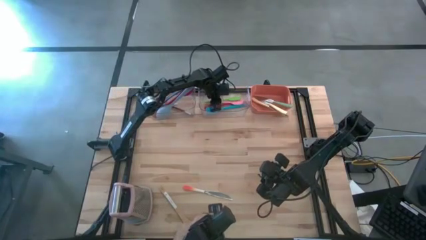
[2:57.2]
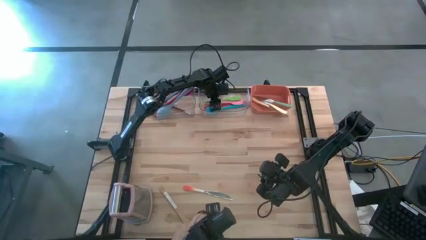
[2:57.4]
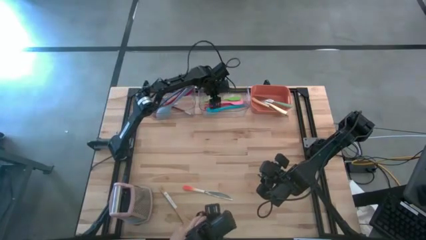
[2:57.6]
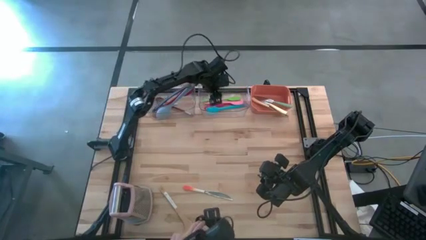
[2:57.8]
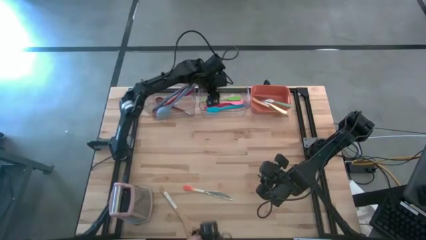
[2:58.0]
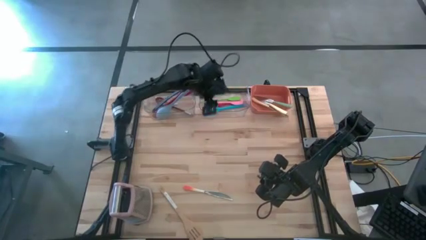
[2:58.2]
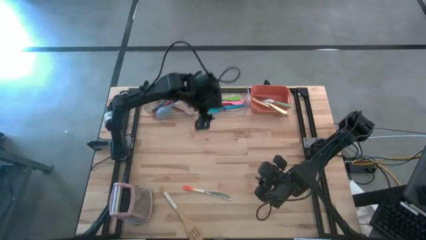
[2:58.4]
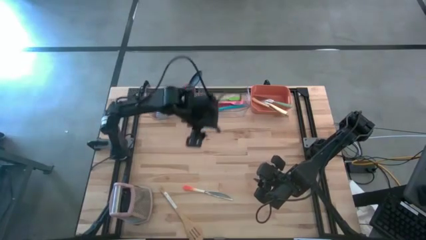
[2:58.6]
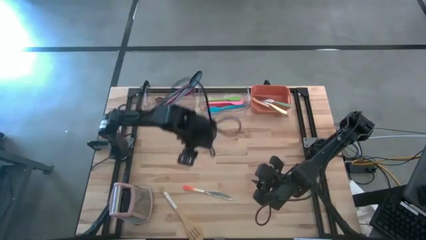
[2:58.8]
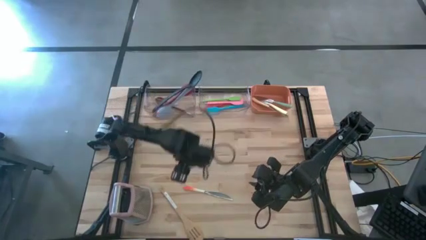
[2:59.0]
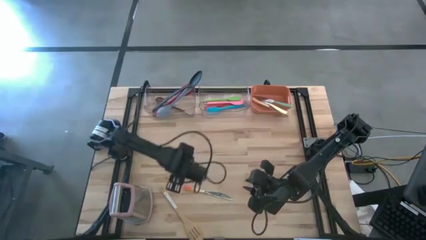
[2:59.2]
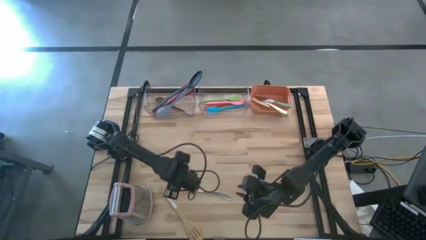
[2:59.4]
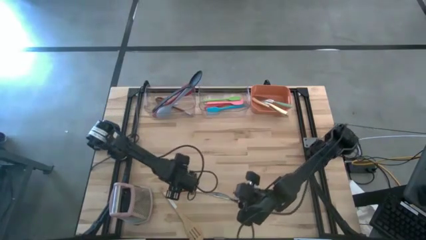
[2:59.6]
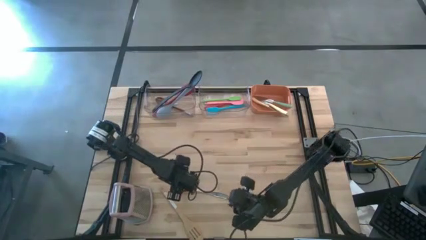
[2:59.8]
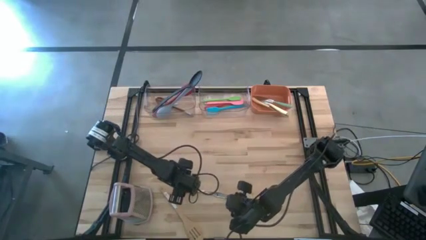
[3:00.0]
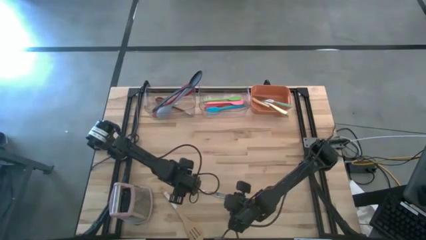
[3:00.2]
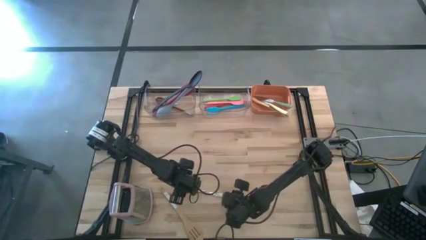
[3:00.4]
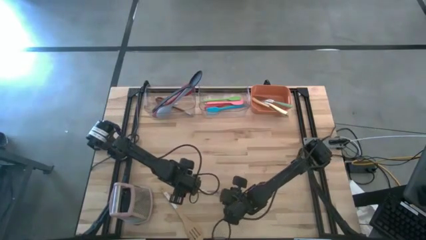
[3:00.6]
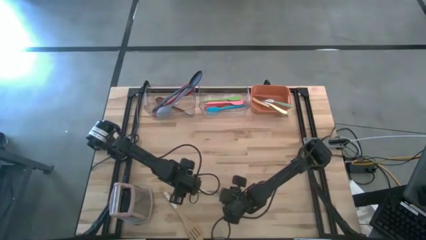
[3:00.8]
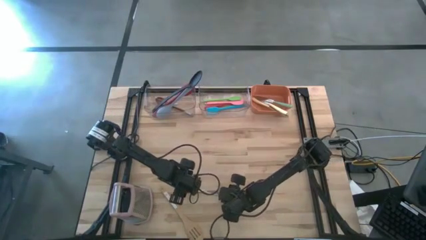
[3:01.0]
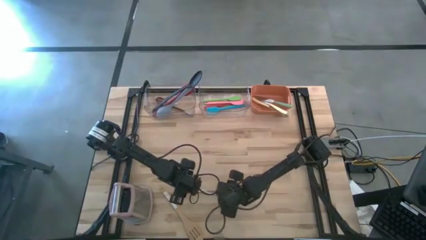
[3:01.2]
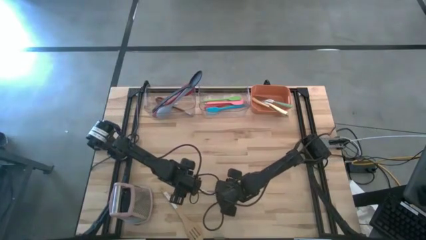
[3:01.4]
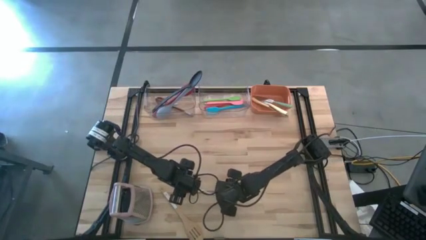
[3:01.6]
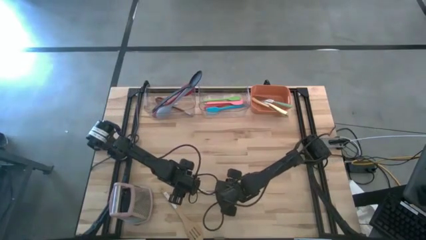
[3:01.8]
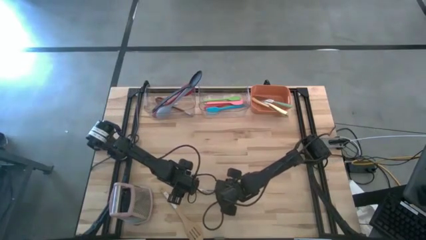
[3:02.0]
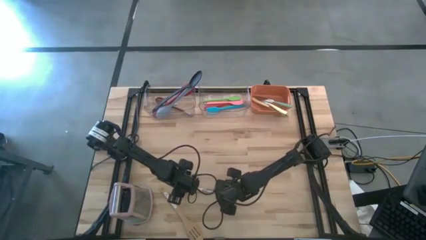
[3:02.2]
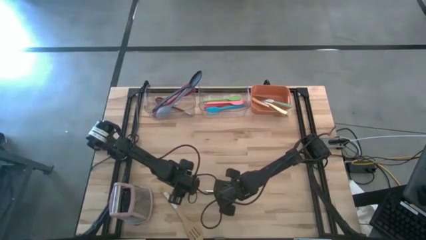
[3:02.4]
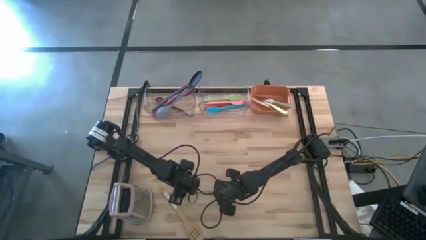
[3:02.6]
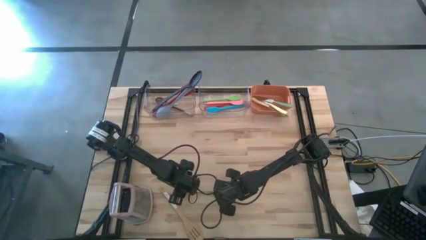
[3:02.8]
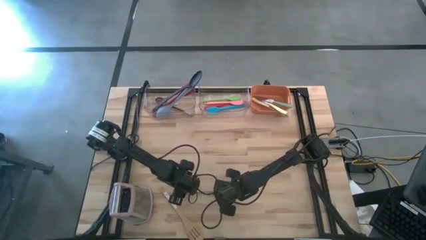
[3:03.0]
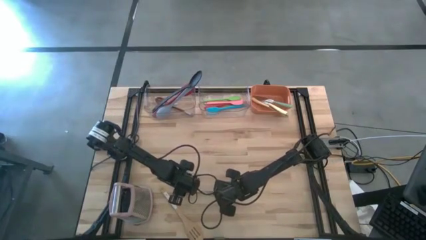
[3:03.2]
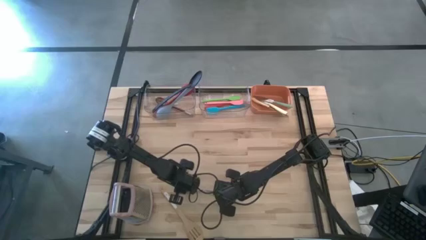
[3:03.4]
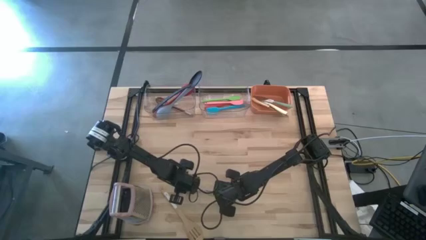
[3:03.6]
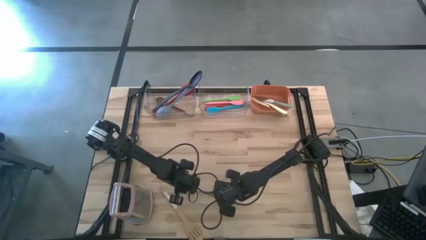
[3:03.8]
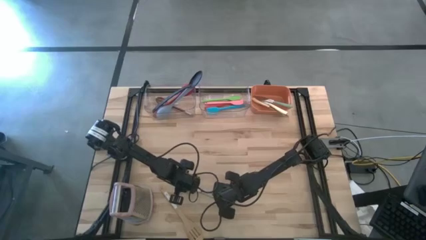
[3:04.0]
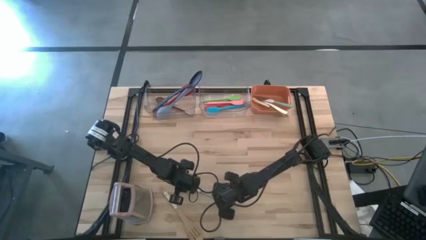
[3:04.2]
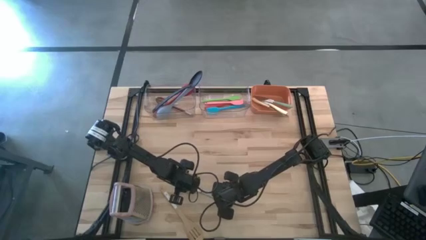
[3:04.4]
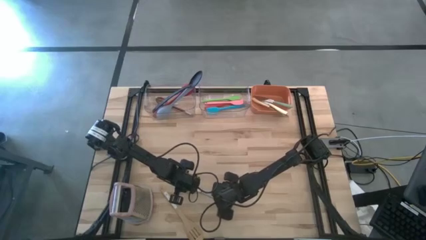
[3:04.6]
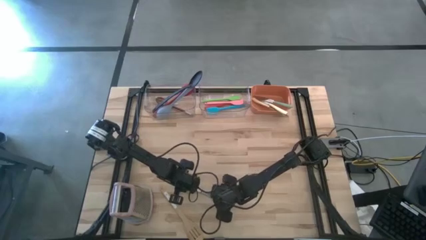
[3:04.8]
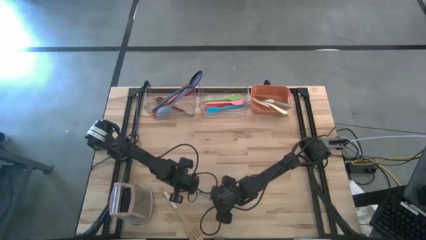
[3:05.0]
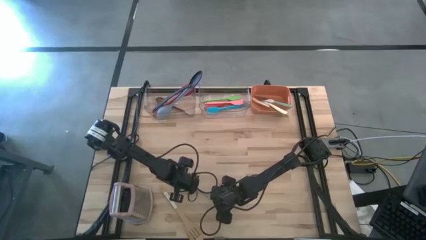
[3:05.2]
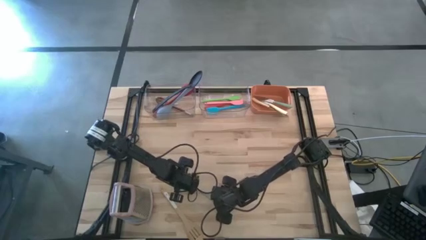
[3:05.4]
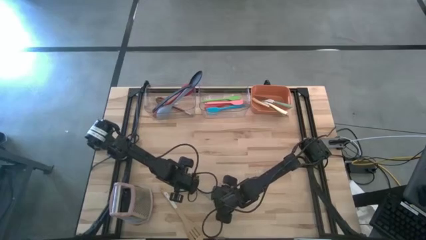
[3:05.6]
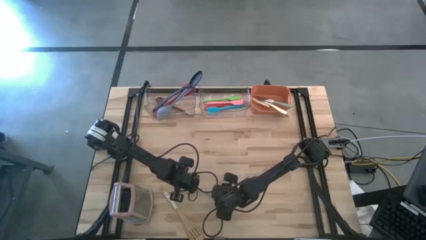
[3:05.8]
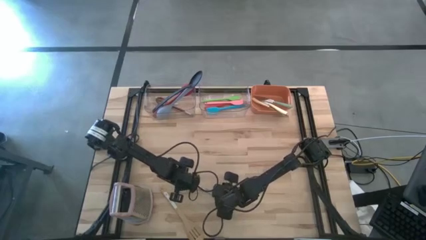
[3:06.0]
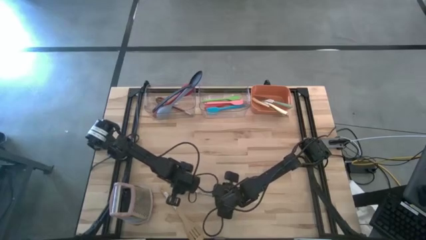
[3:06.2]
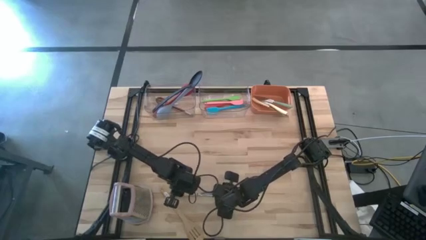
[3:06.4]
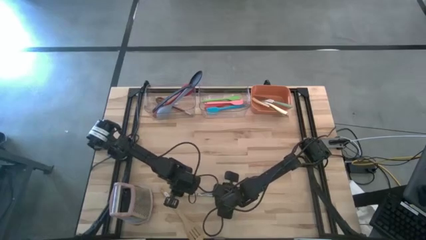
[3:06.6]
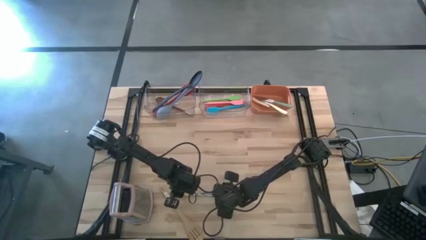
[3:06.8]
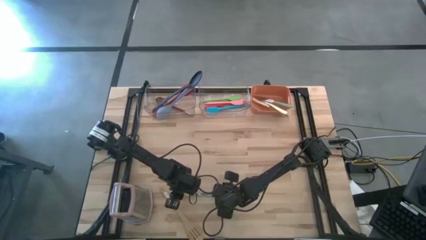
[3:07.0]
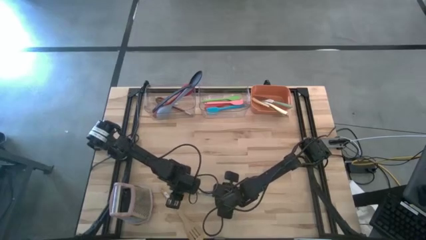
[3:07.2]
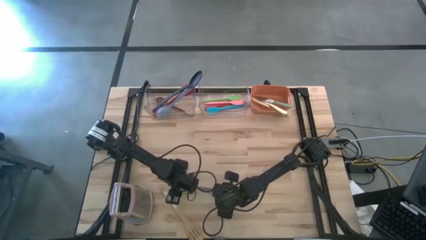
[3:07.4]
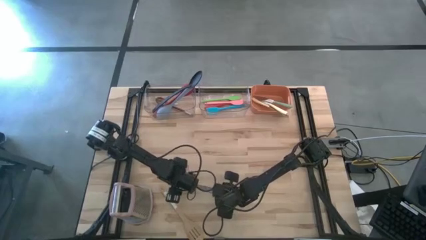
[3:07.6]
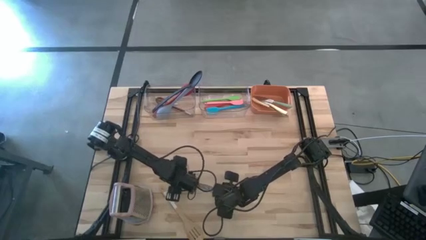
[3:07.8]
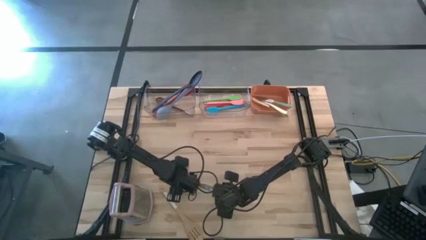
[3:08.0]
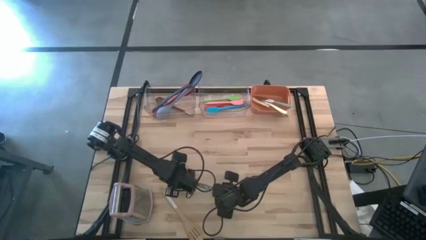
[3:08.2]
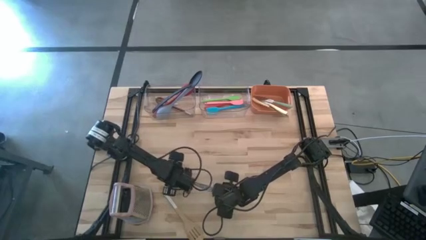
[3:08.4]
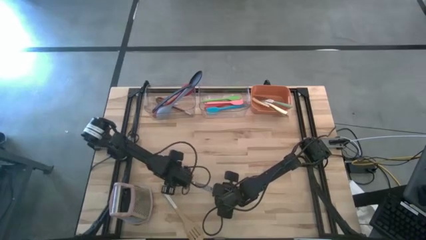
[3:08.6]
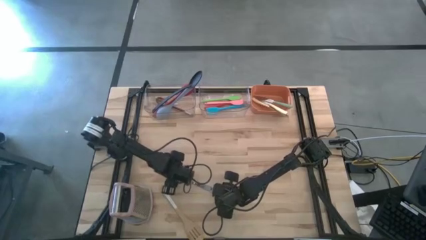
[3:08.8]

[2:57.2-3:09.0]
Task: Pick & Place Kitchen Items
Put the orange knife into the orange bin
